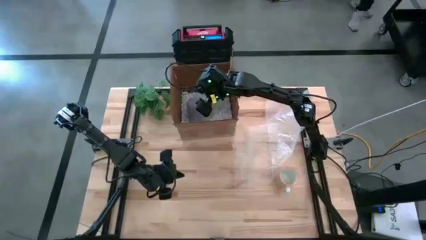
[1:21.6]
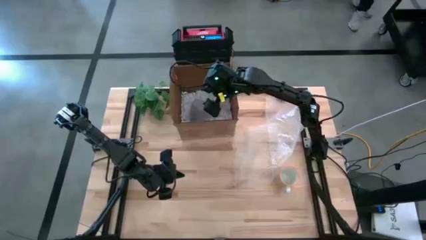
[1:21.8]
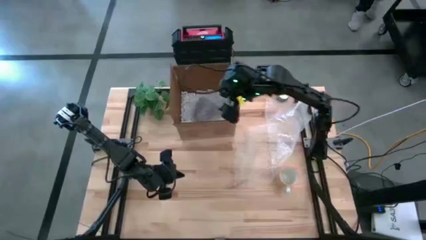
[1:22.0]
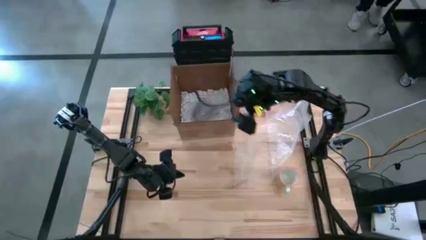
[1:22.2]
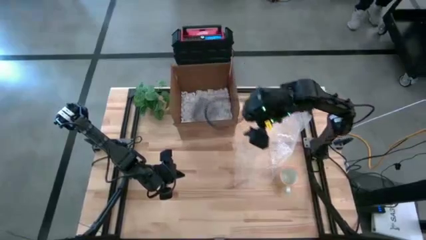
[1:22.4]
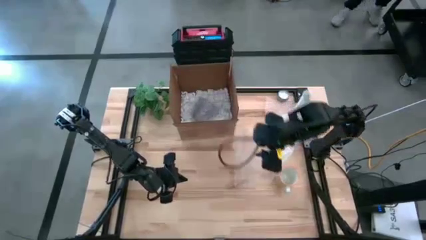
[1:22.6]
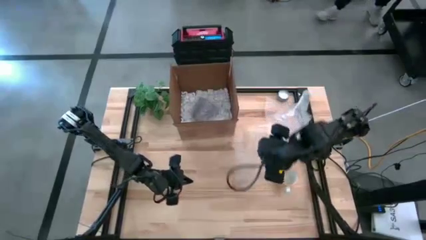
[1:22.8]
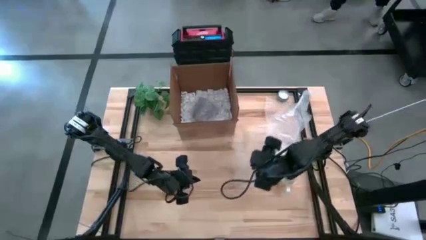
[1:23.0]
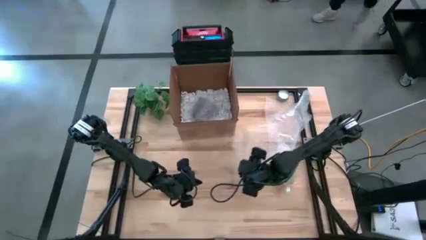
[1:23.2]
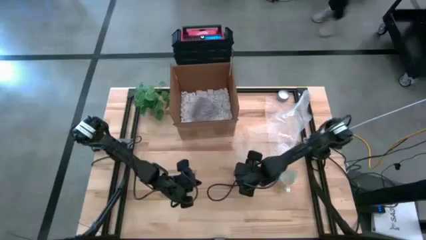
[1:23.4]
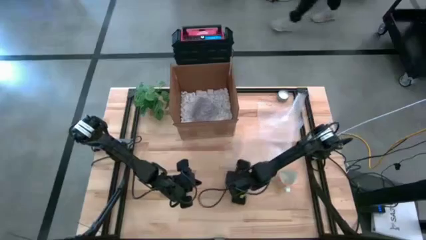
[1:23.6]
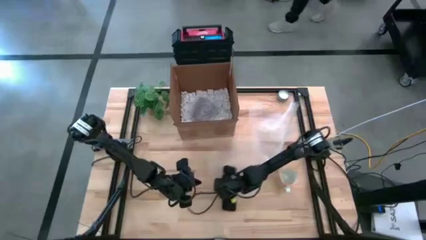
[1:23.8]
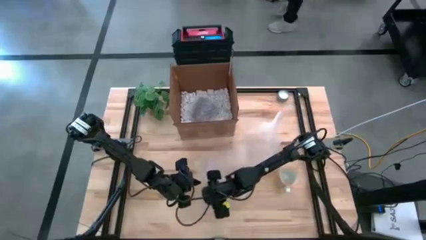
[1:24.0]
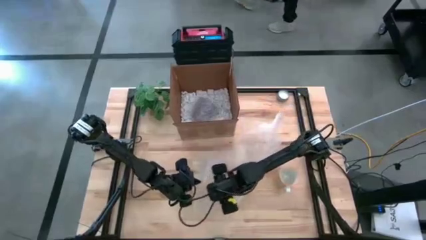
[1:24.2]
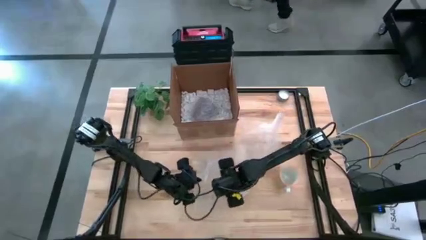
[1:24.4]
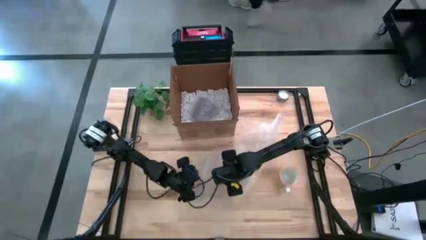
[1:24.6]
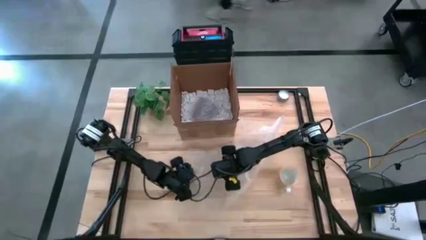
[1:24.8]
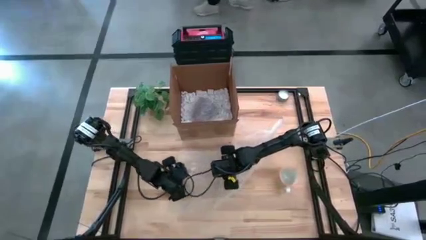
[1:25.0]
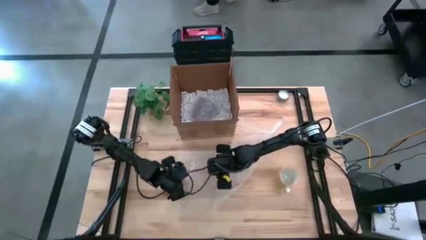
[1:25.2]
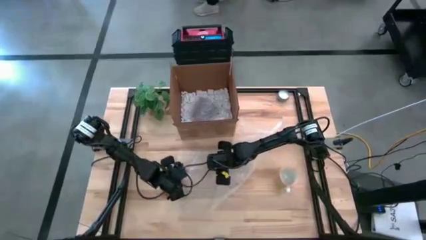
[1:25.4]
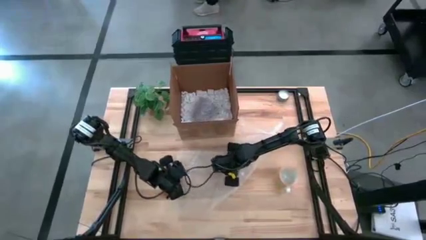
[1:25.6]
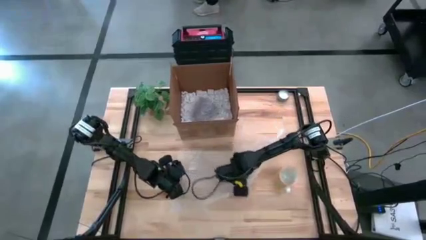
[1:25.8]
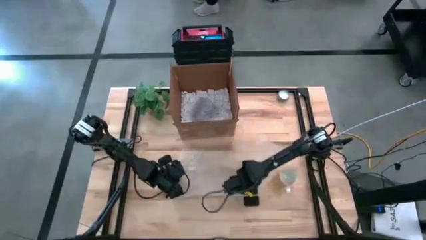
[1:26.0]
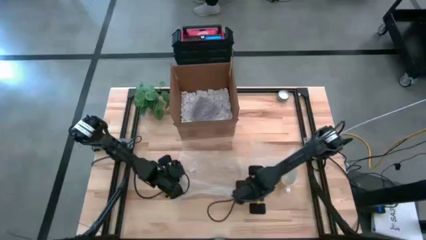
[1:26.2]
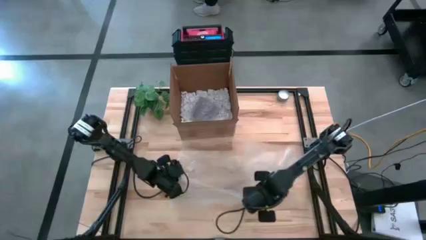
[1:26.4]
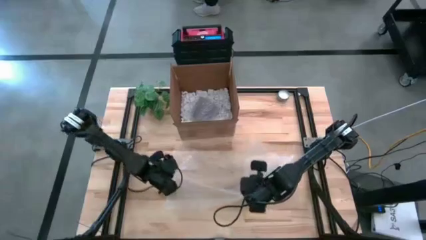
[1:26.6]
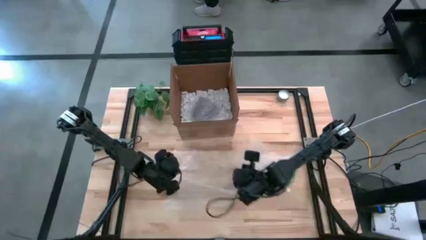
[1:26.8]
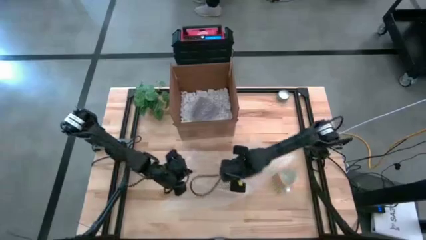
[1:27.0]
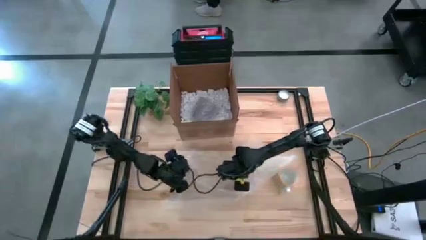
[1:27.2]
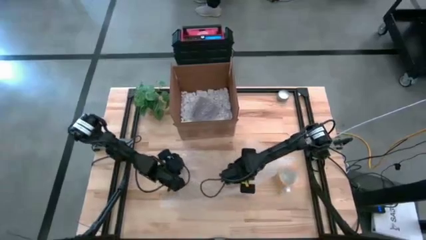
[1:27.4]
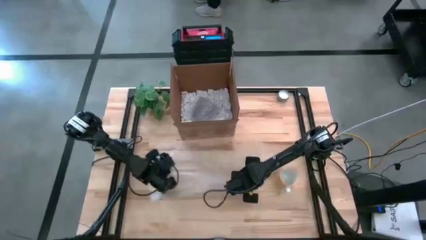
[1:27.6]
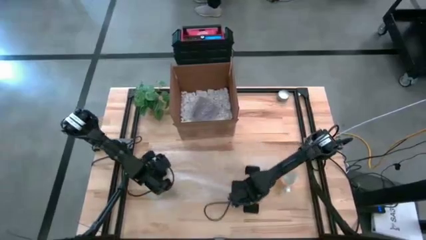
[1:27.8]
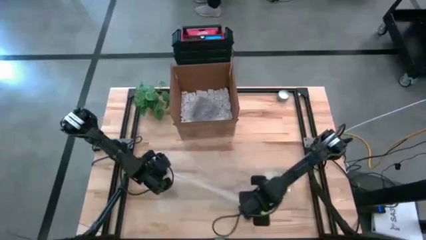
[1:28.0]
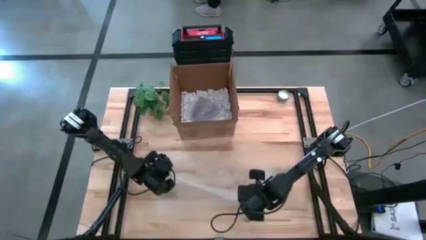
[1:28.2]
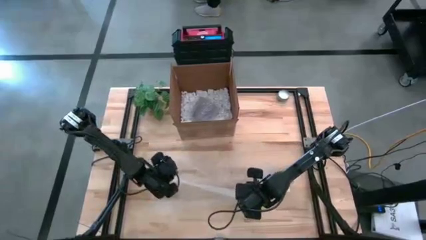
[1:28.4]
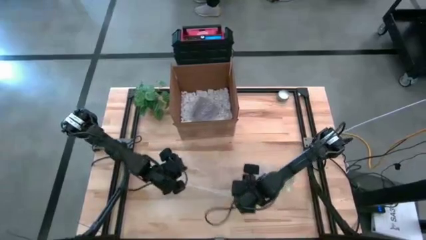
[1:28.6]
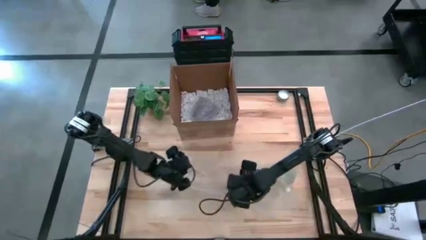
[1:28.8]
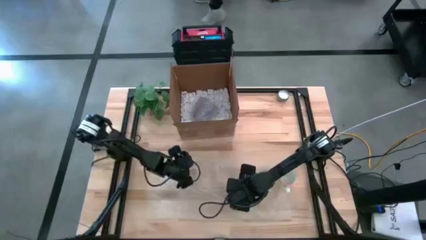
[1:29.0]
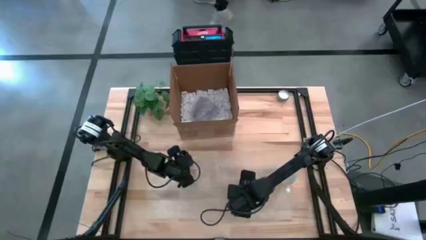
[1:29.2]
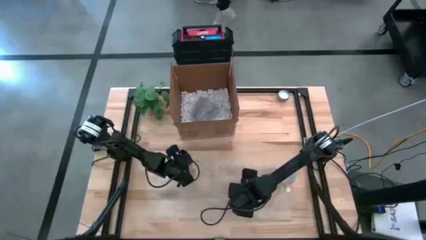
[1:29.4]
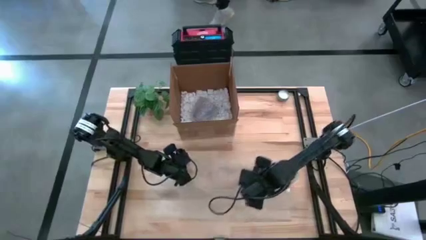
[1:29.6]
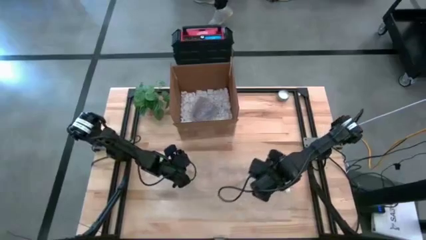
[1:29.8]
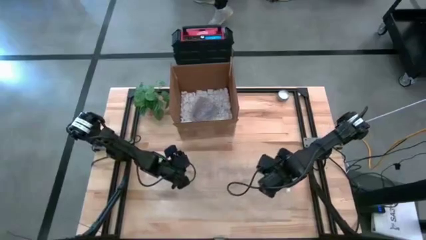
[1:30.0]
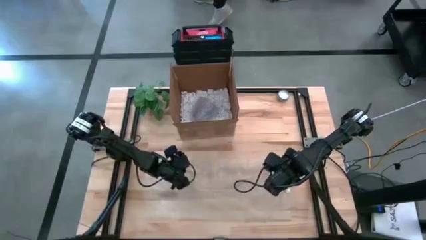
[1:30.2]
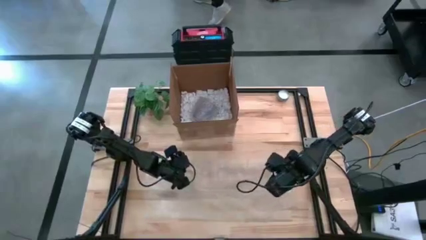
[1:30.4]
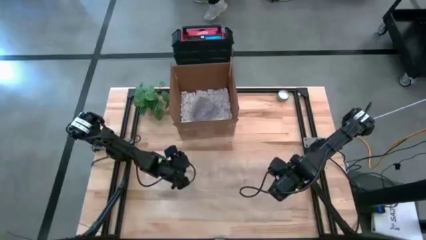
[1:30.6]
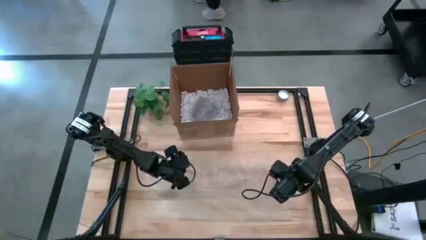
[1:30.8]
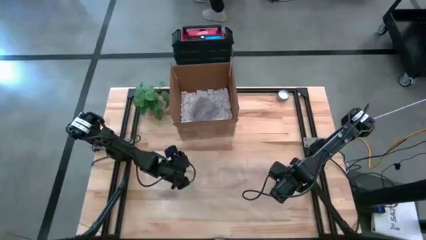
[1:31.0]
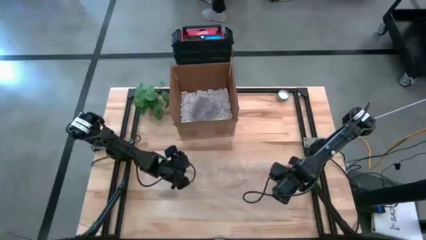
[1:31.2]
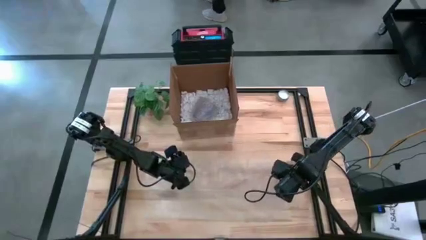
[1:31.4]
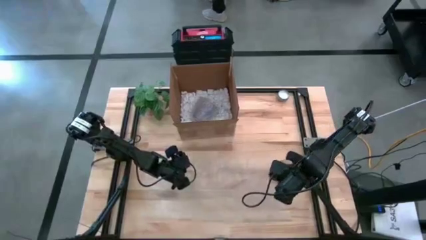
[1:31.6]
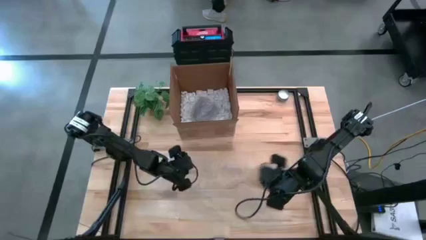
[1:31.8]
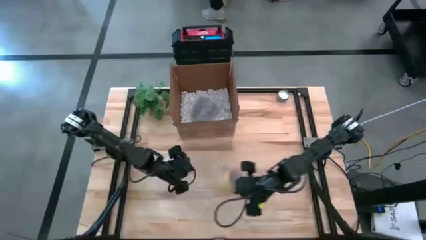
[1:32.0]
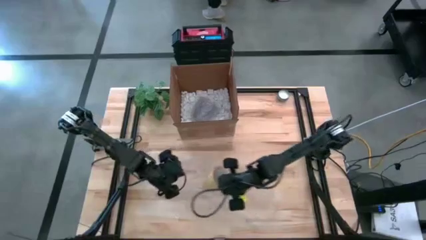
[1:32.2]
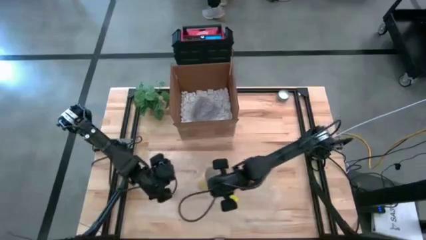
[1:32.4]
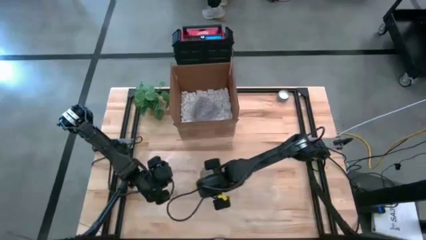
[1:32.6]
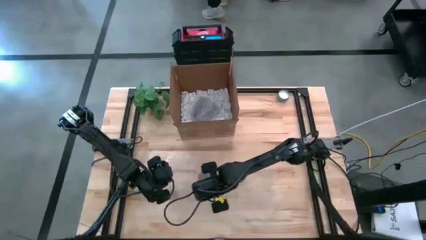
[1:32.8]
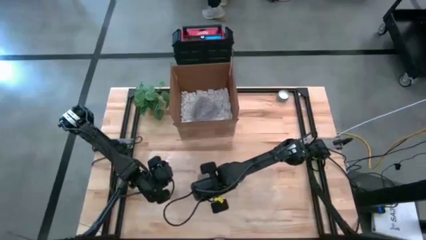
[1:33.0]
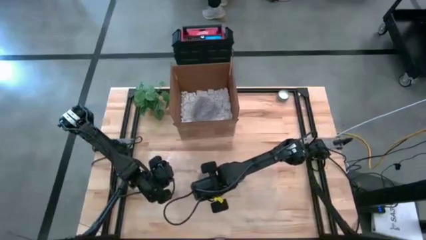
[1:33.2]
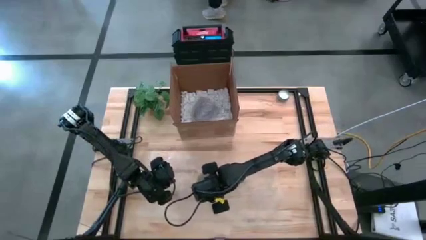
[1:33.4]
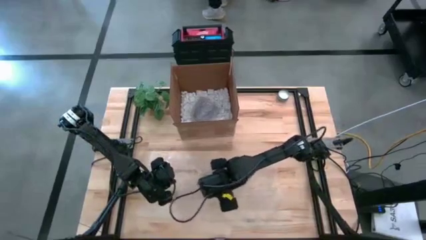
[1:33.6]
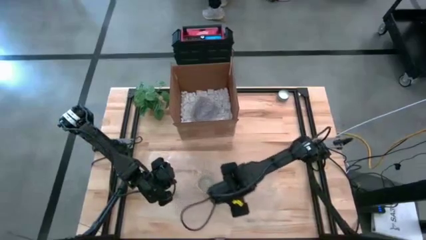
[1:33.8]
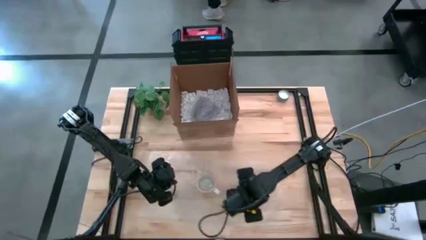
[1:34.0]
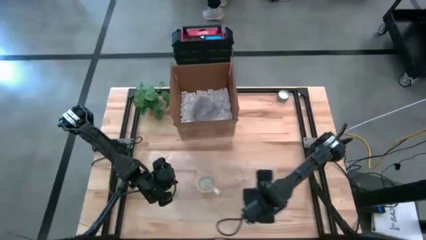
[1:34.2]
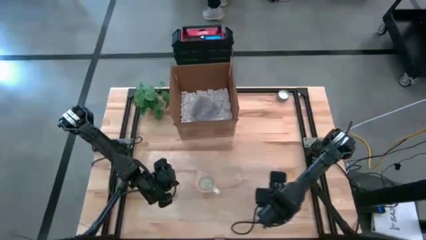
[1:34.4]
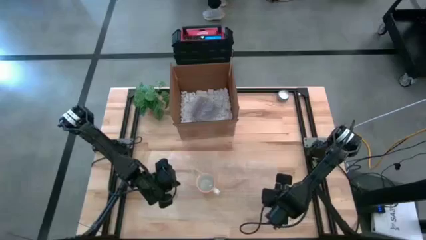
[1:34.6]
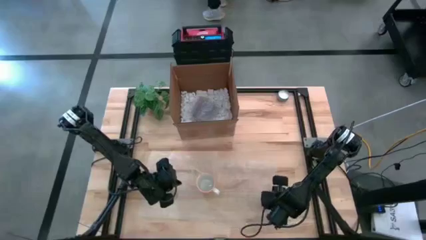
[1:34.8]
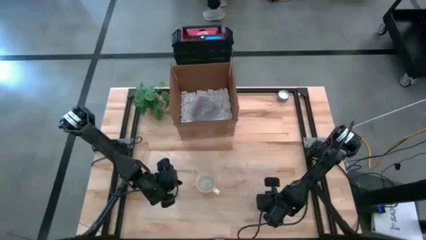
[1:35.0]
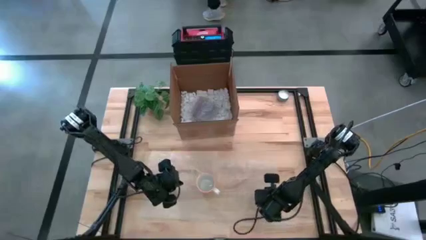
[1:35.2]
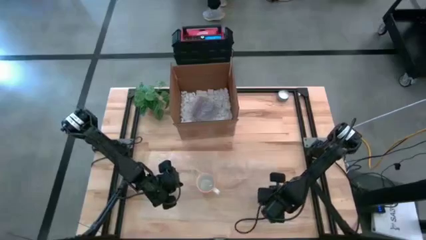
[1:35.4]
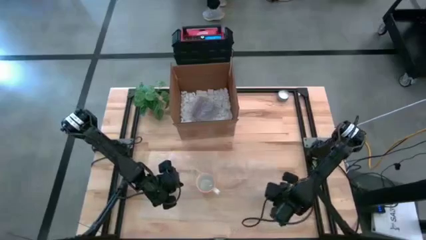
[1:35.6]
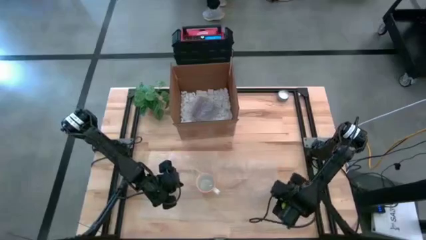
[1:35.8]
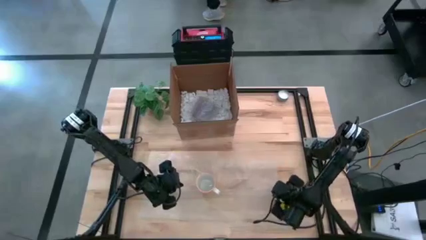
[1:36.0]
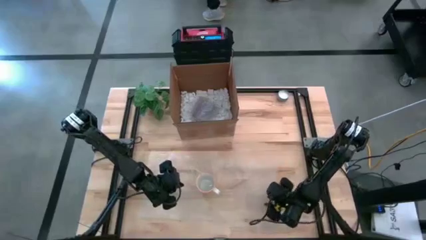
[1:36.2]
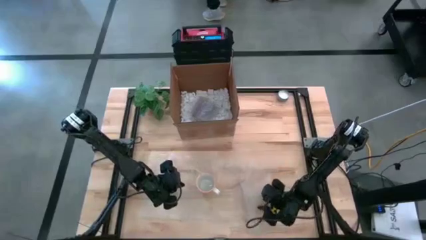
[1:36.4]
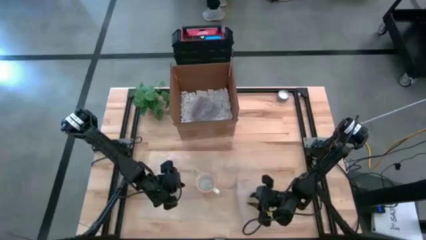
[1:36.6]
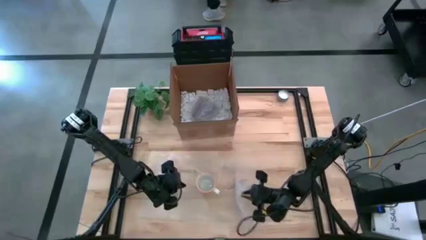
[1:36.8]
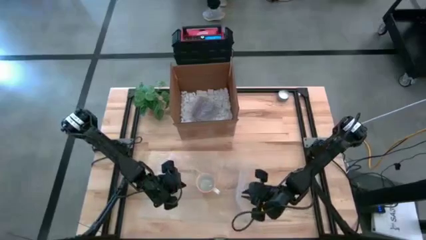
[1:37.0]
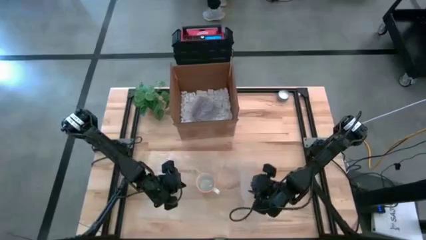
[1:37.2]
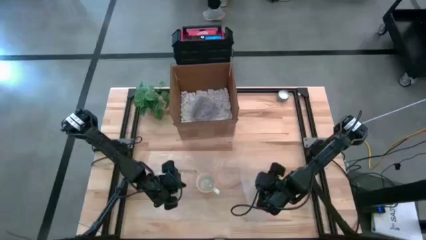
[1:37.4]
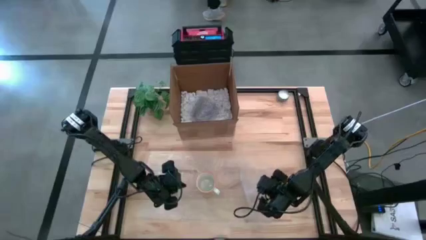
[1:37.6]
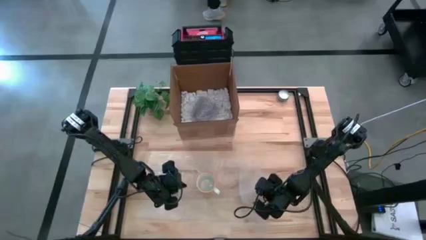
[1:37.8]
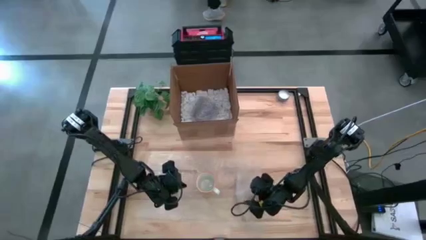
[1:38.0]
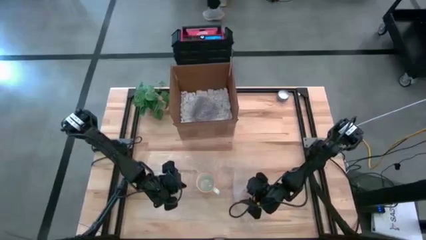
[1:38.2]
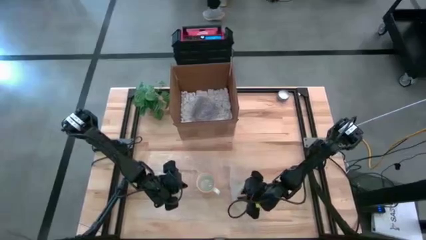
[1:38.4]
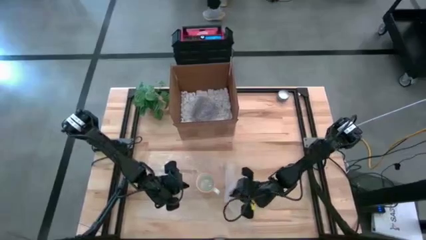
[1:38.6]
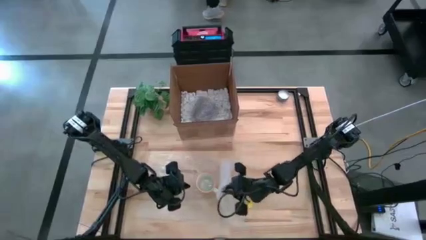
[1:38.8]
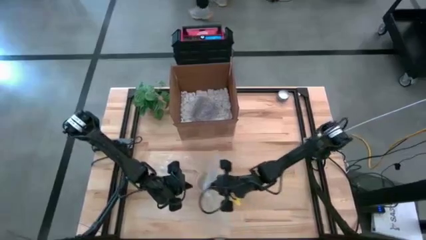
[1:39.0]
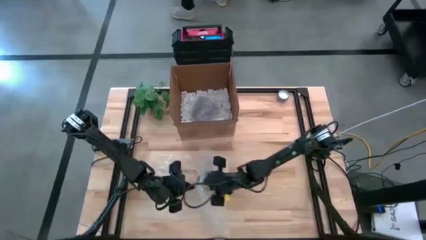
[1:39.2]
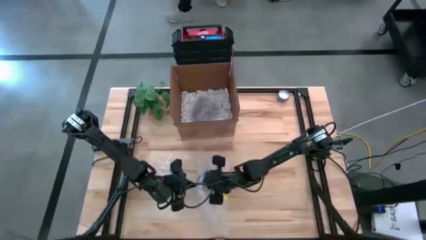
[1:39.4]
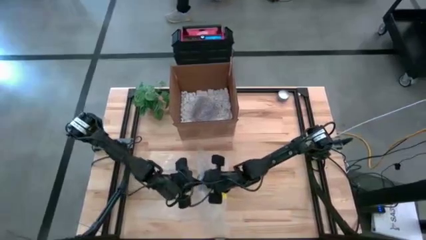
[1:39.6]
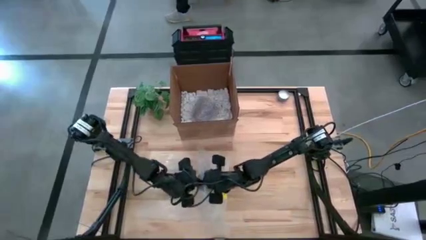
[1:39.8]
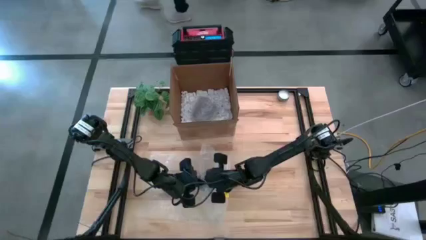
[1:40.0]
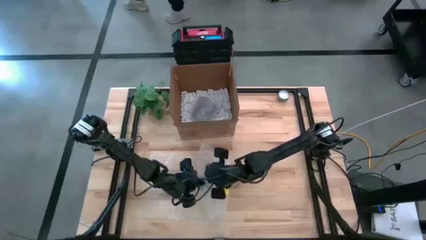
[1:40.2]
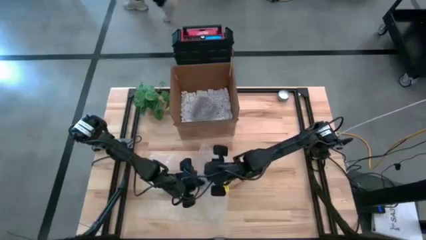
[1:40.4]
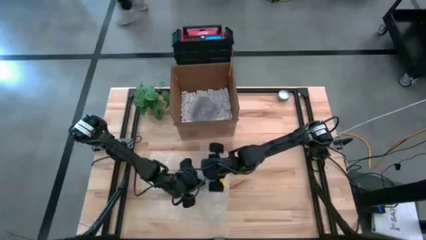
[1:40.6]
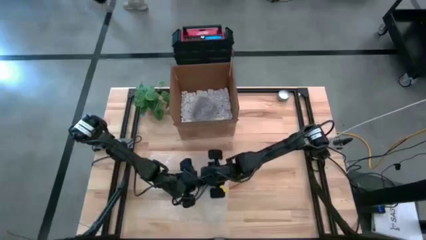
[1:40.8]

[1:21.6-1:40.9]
Task: wrap mug
Wrap the yellow mug using the bubble wrap
